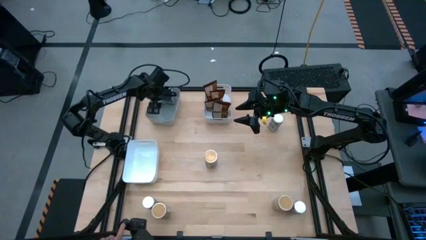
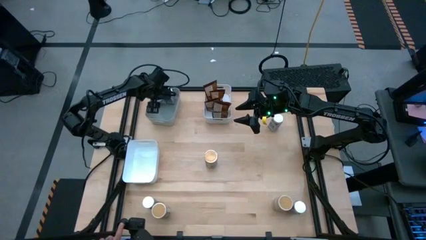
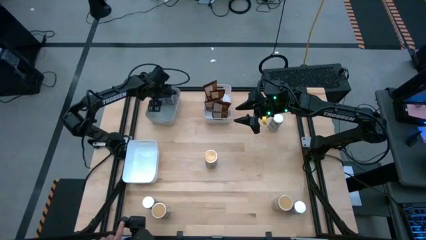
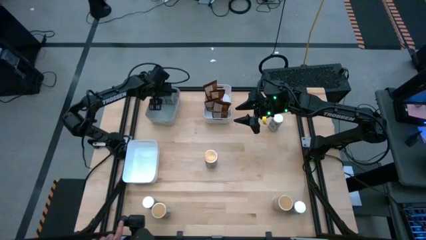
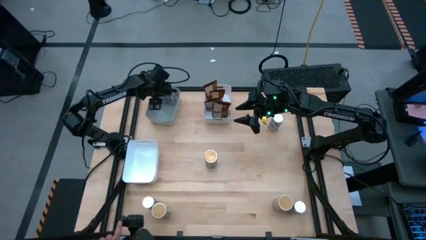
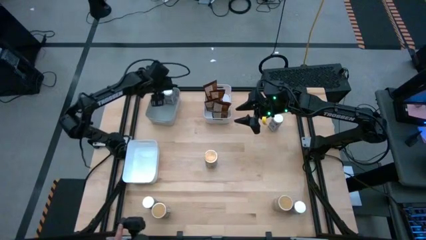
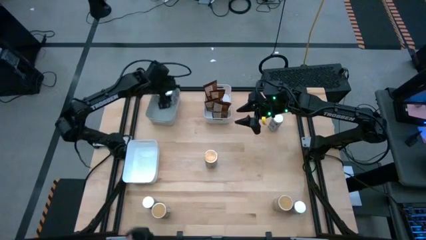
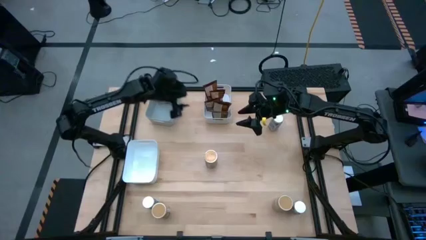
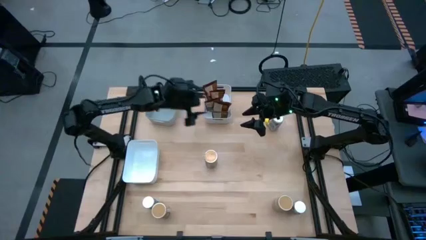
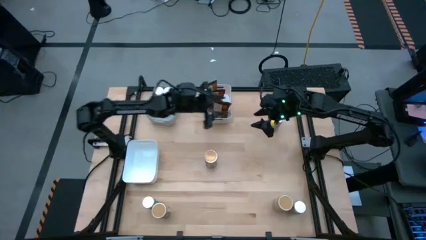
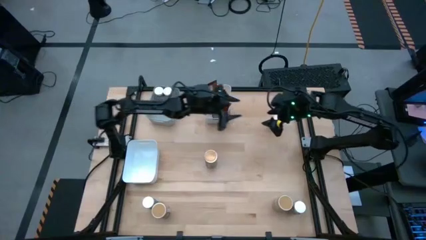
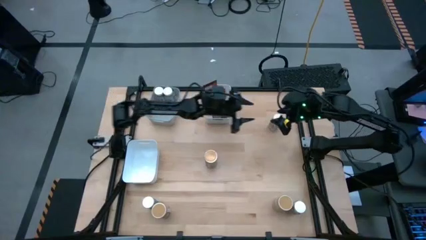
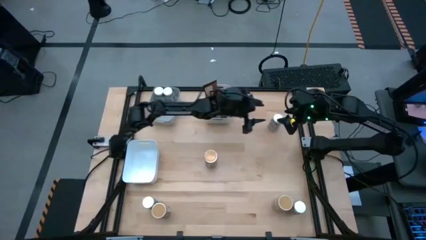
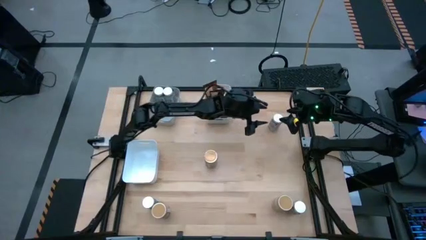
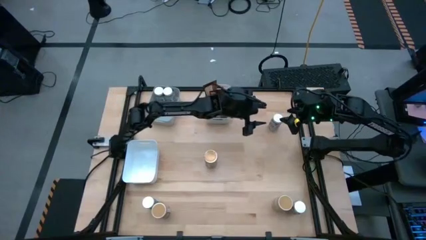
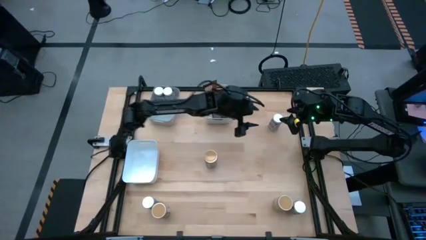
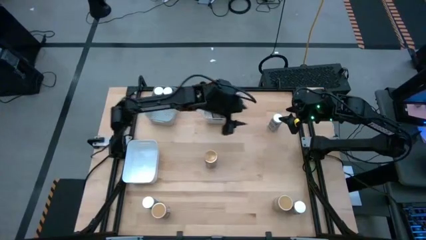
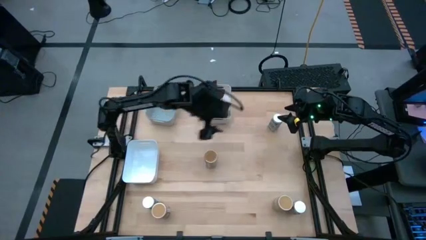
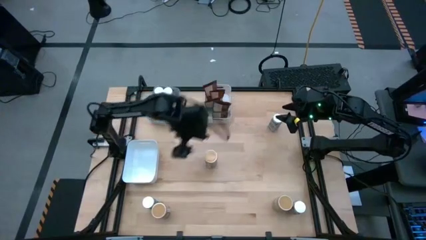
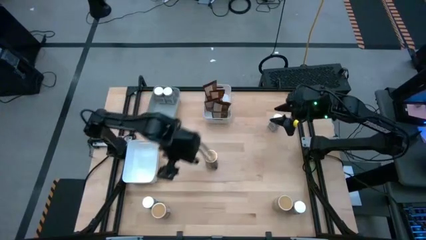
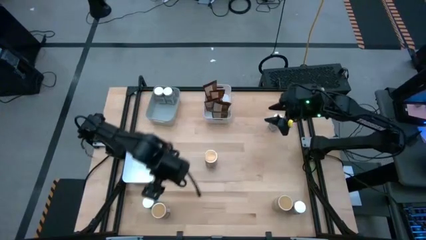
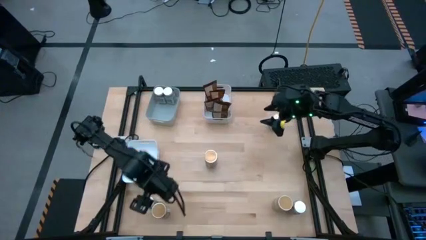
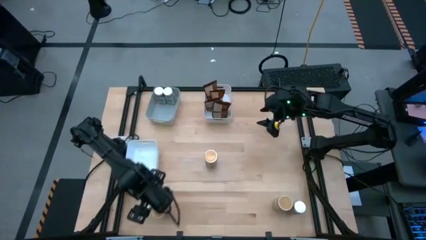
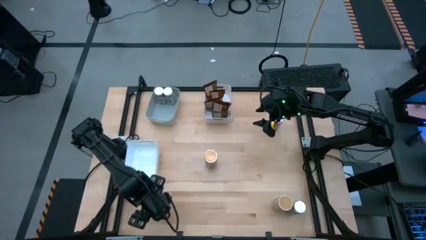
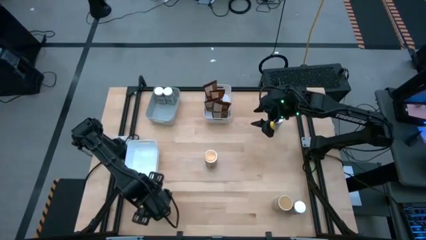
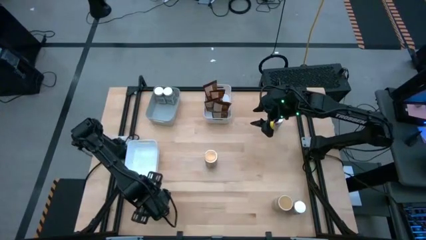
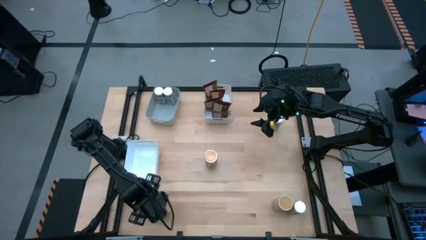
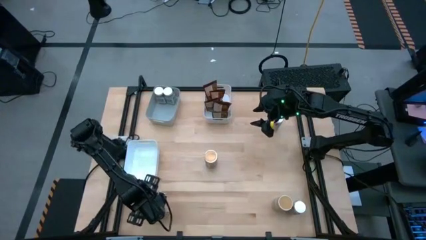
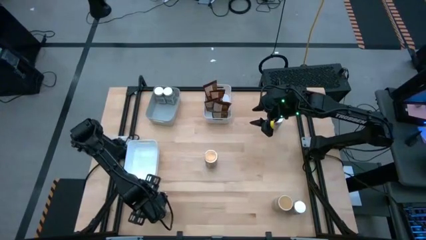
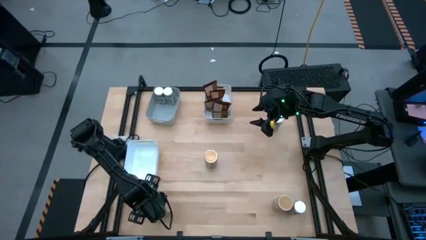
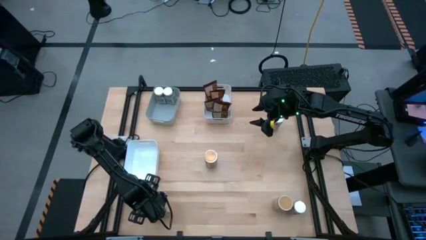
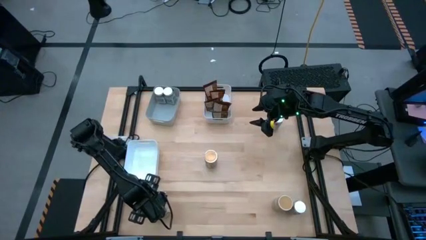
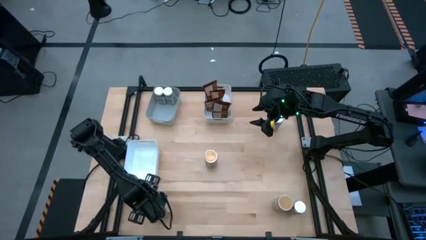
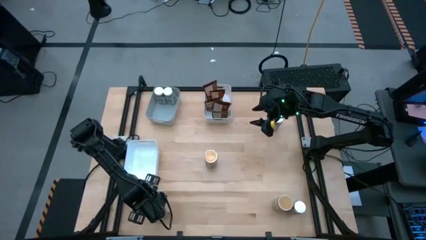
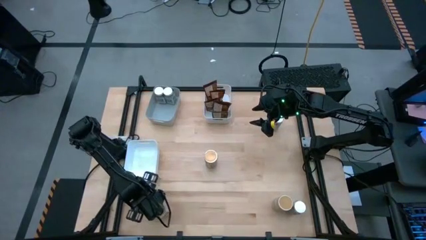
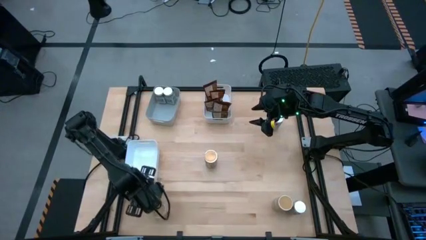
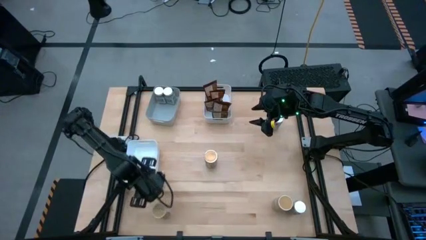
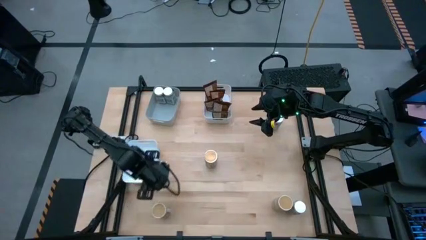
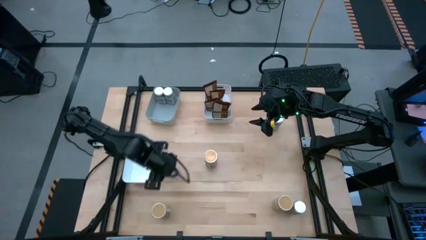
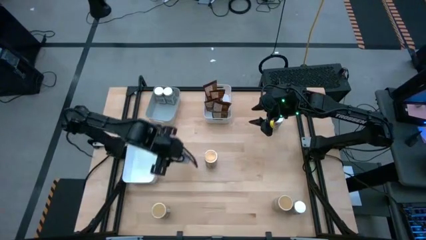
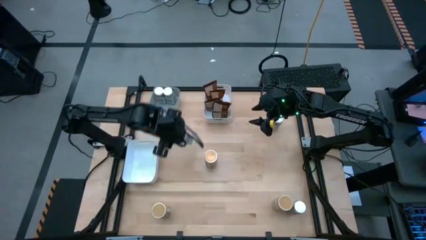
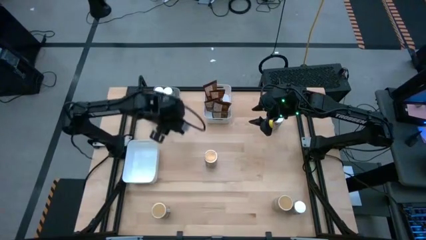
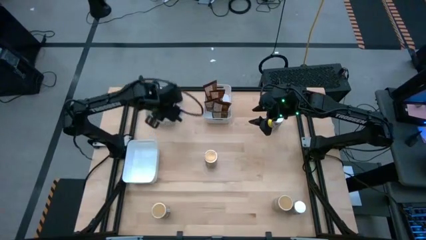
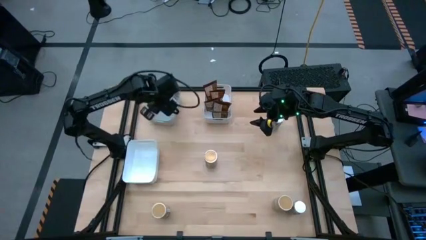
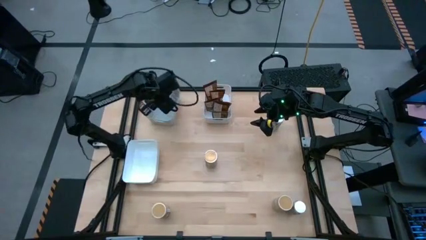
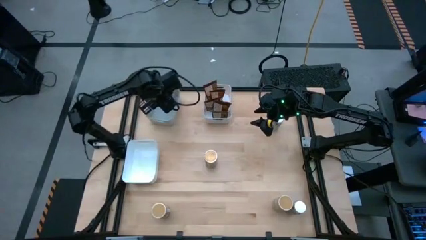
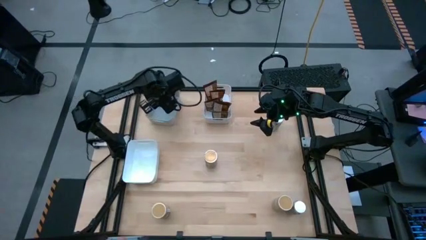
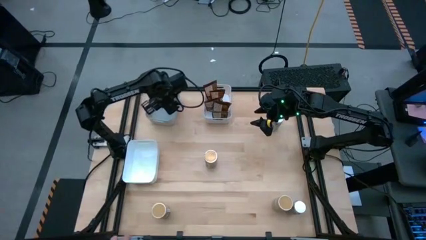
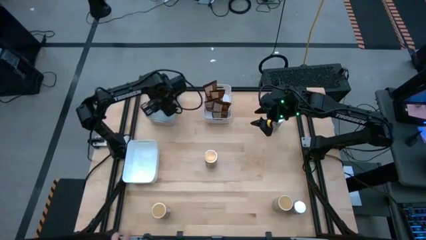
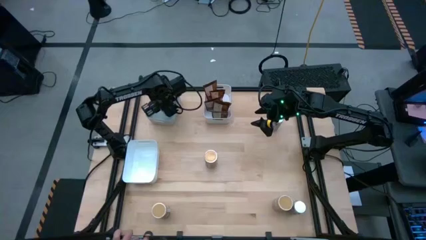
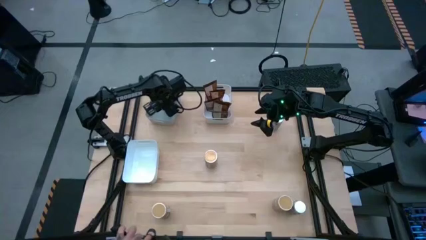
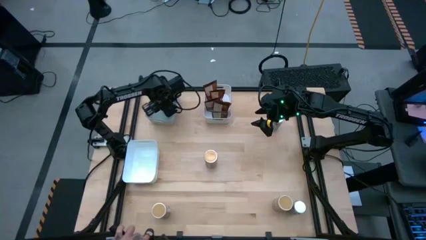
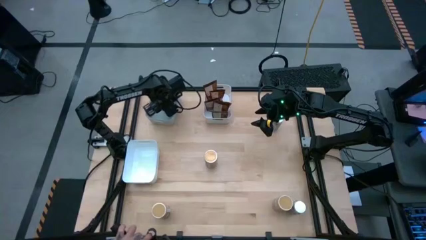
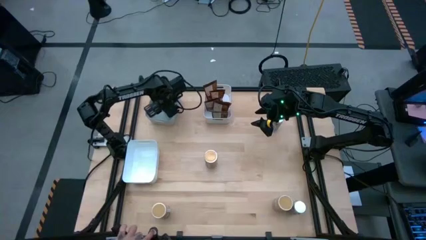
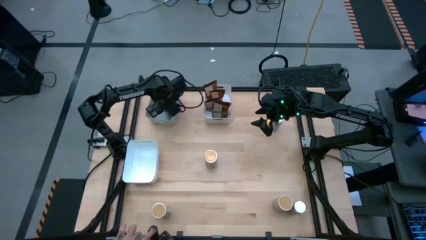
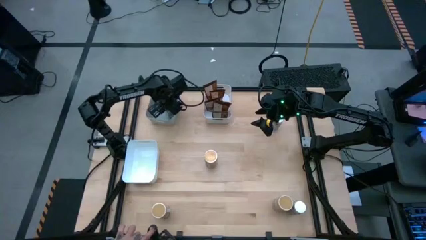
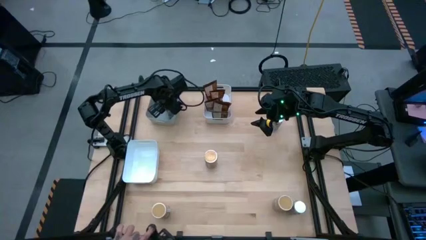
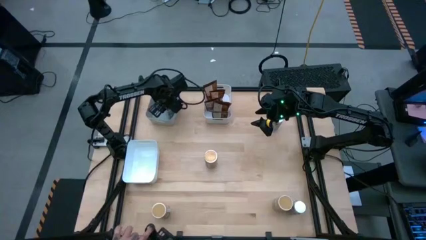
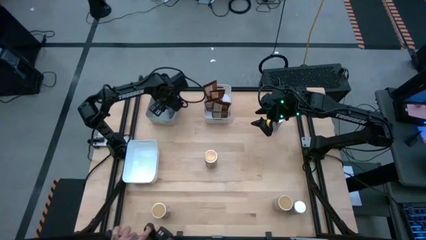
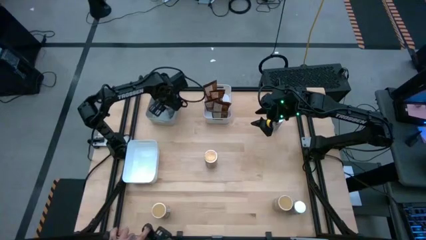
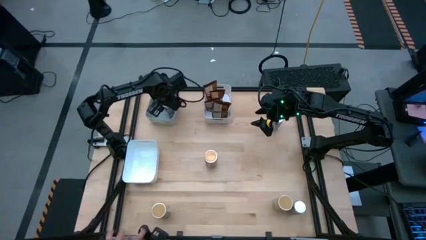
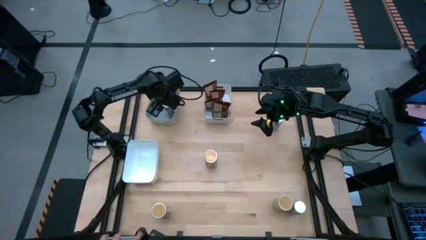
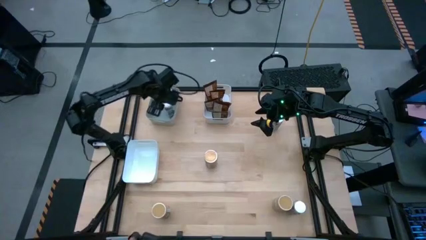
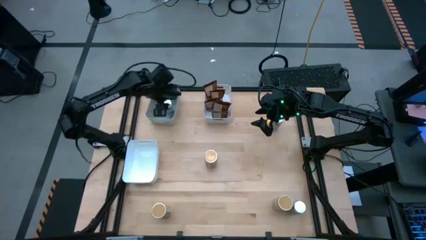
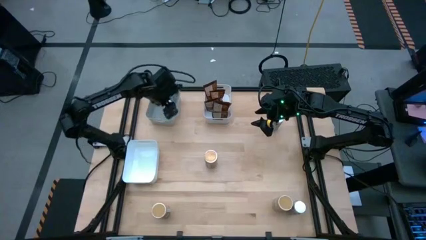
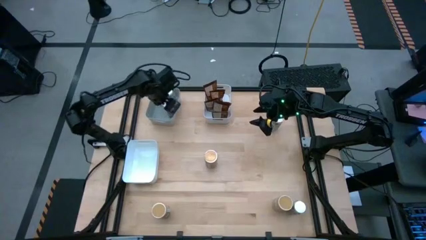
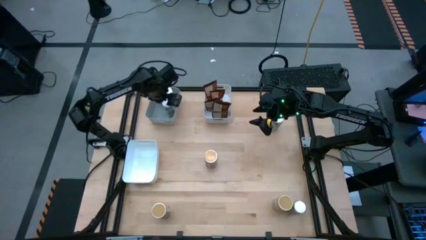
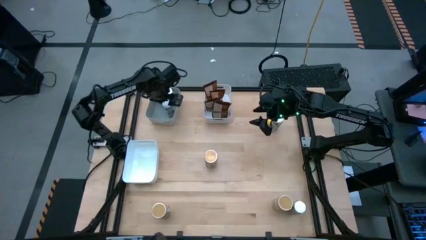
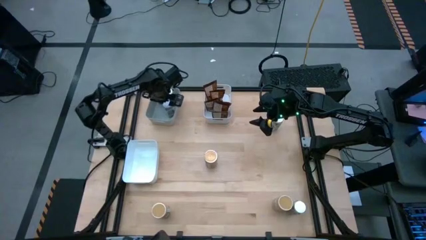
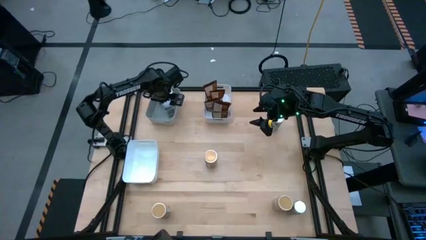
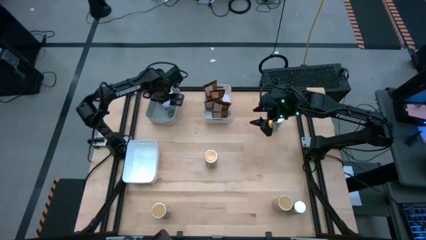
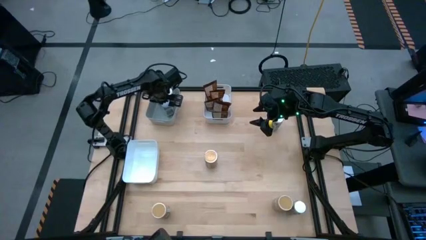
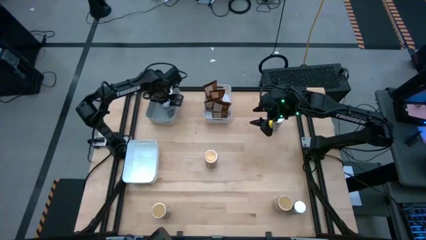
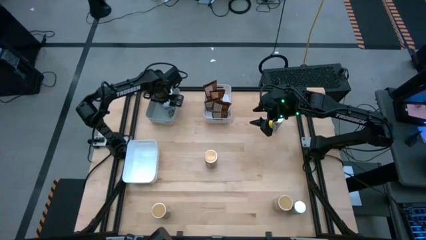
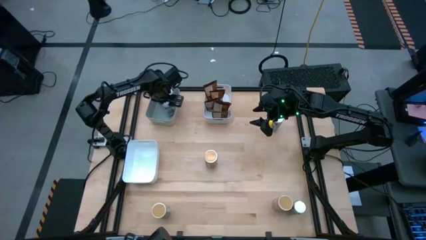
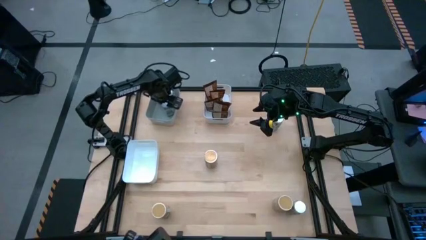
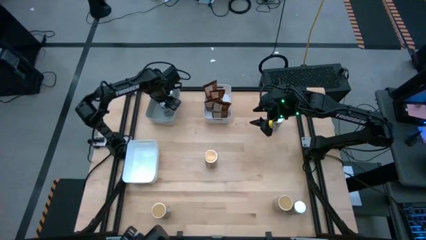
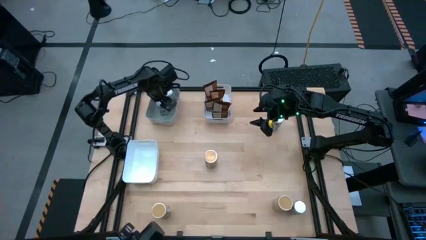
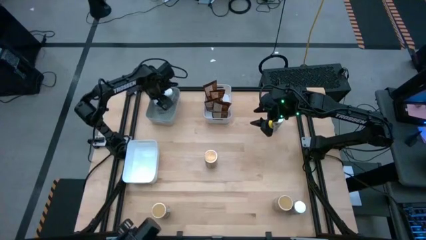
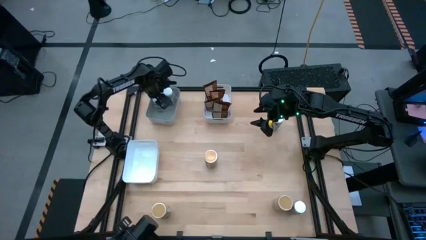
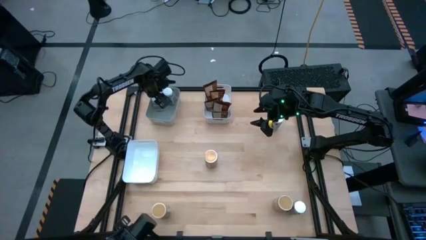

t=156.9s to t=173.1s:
Task: Sort spices by type
Put the white seasoning bottle into the gray bin
